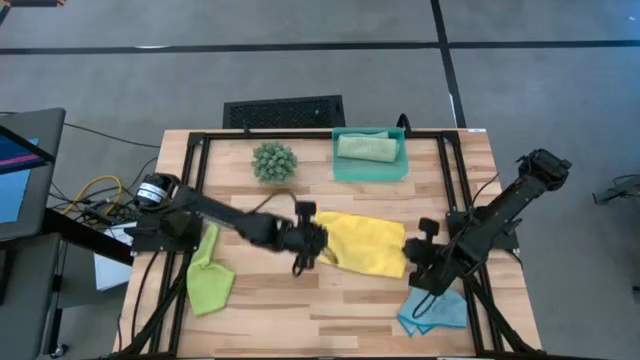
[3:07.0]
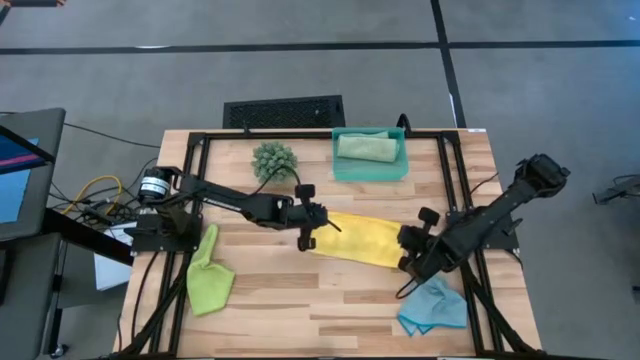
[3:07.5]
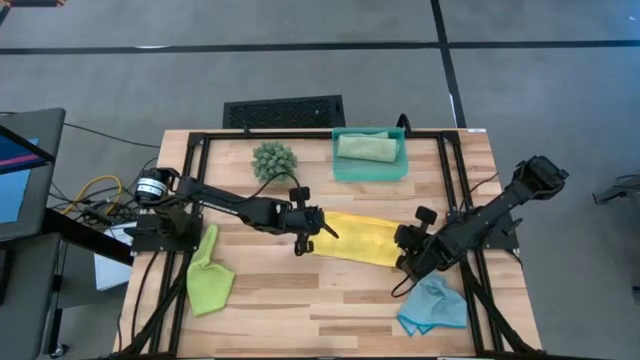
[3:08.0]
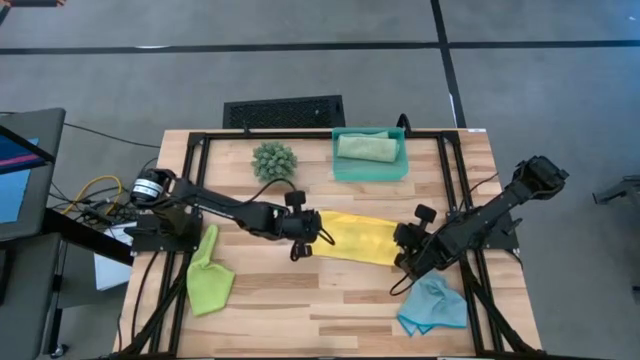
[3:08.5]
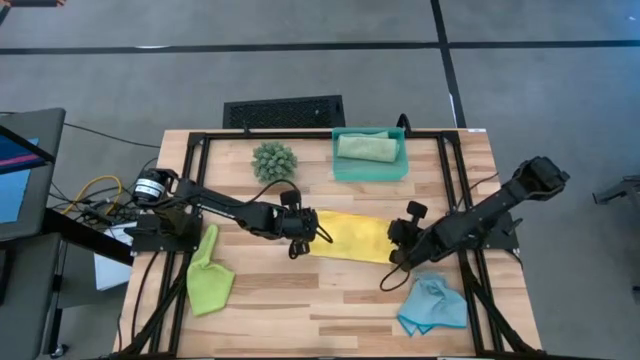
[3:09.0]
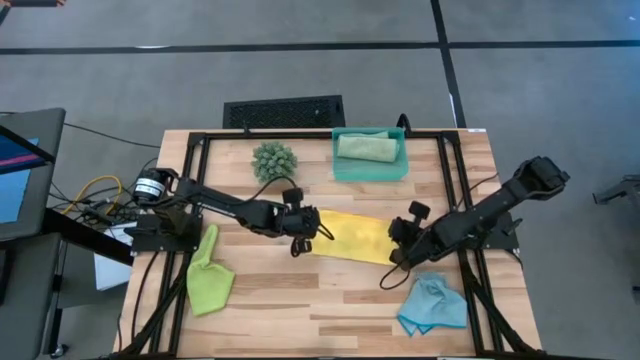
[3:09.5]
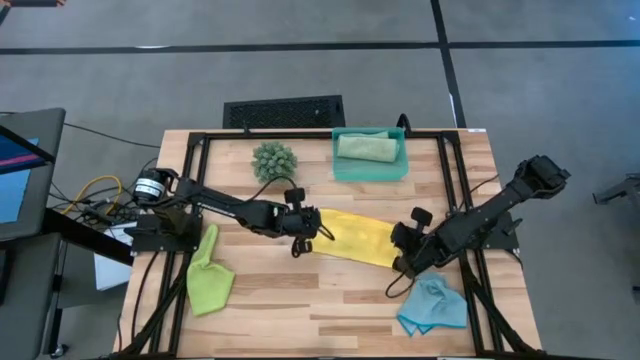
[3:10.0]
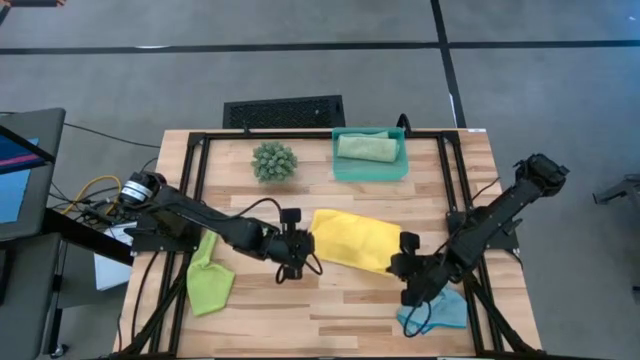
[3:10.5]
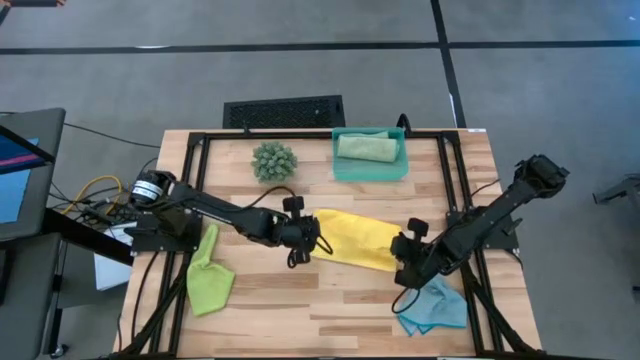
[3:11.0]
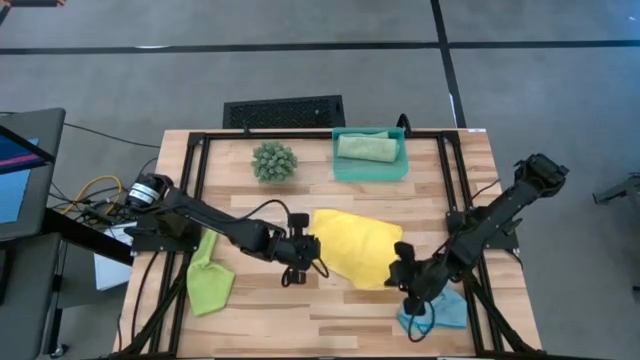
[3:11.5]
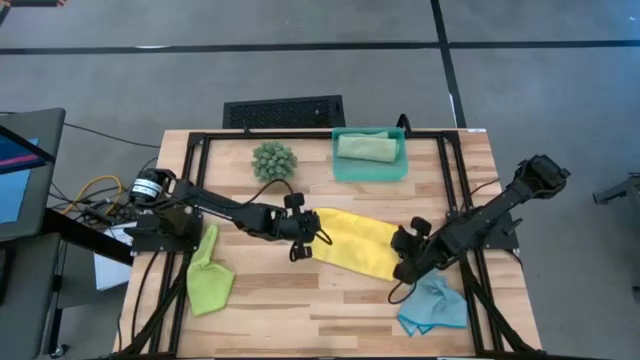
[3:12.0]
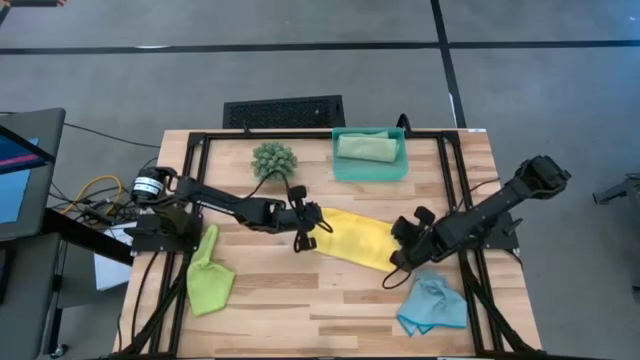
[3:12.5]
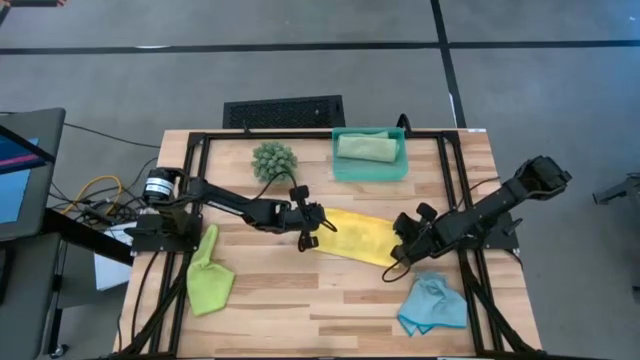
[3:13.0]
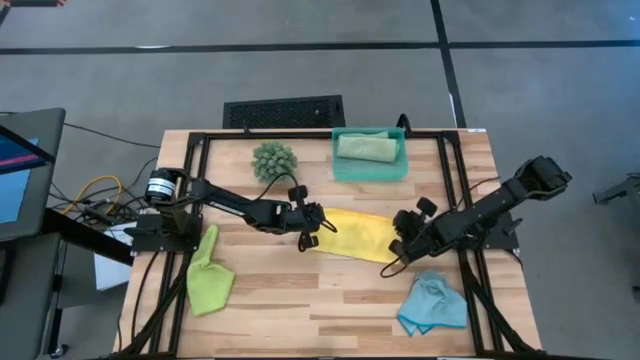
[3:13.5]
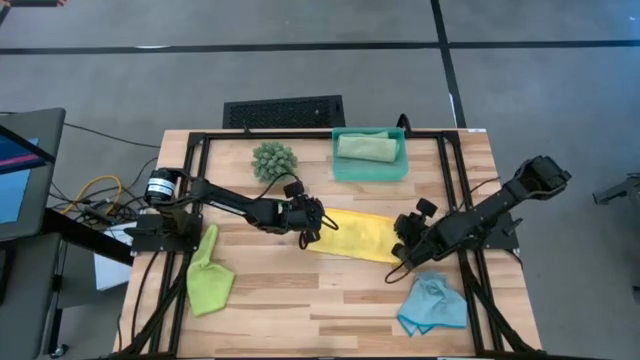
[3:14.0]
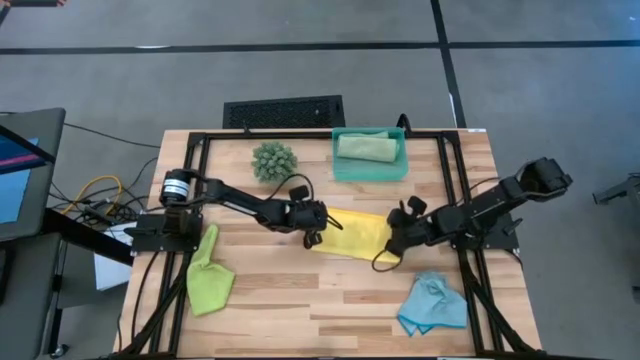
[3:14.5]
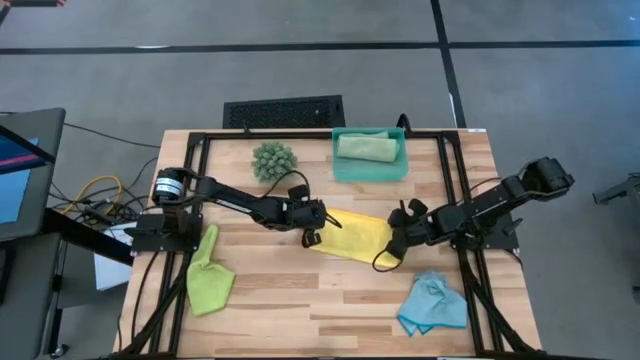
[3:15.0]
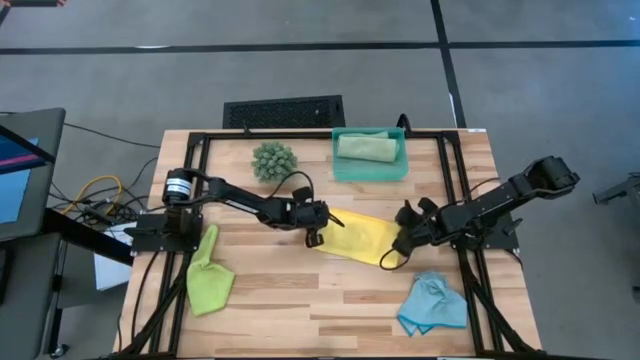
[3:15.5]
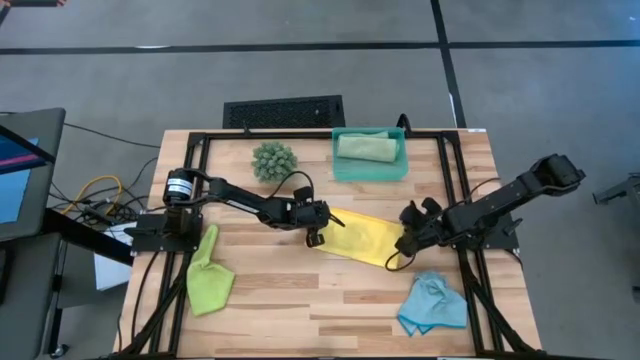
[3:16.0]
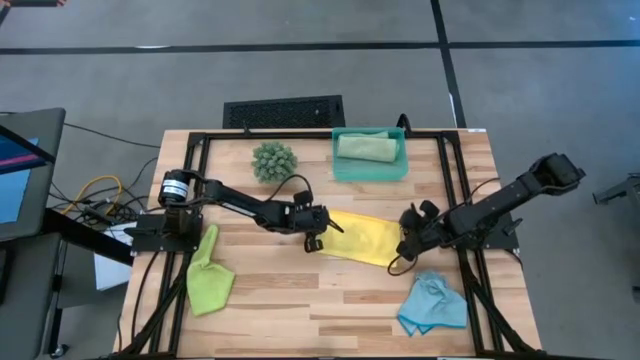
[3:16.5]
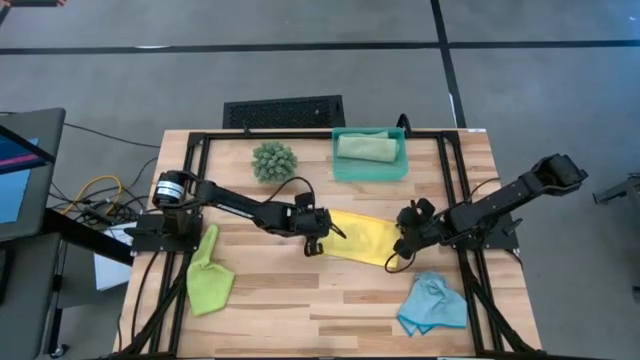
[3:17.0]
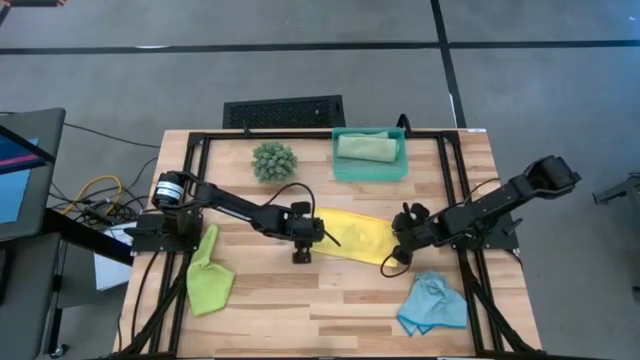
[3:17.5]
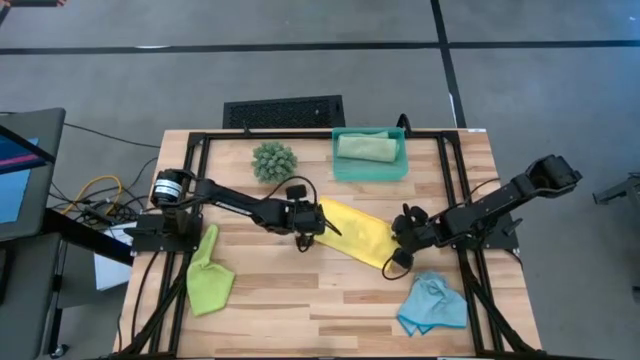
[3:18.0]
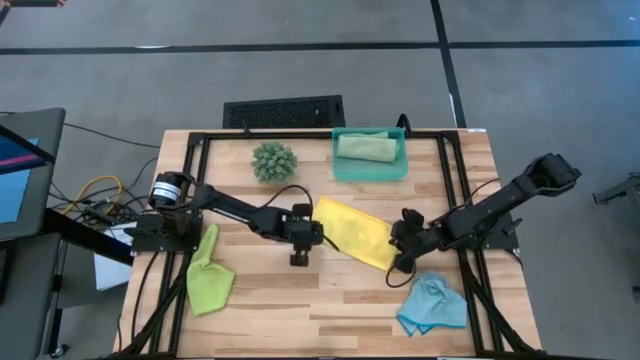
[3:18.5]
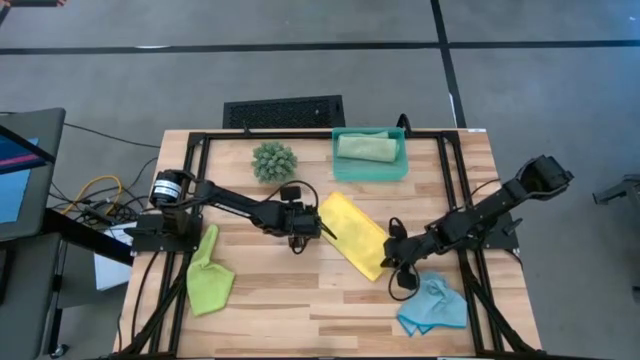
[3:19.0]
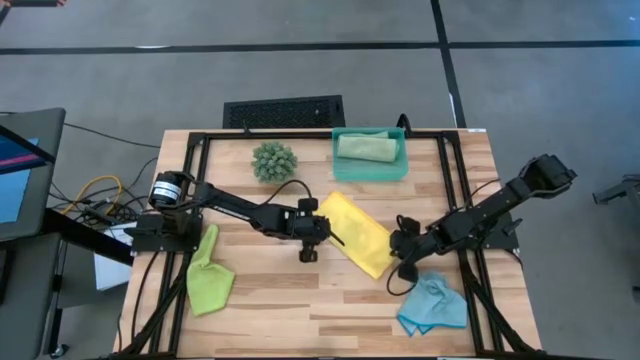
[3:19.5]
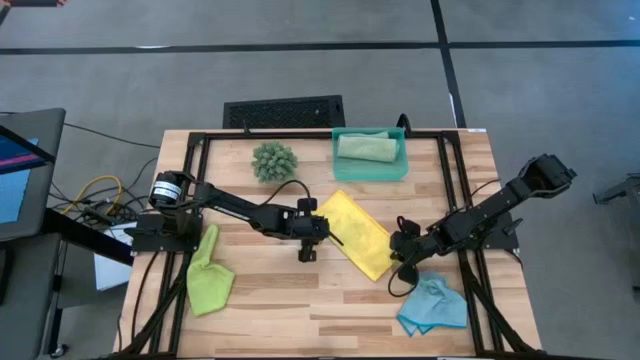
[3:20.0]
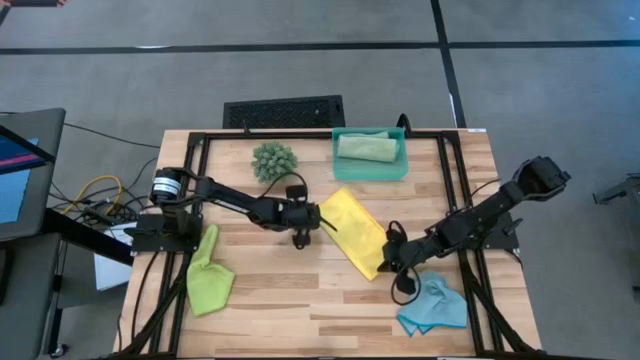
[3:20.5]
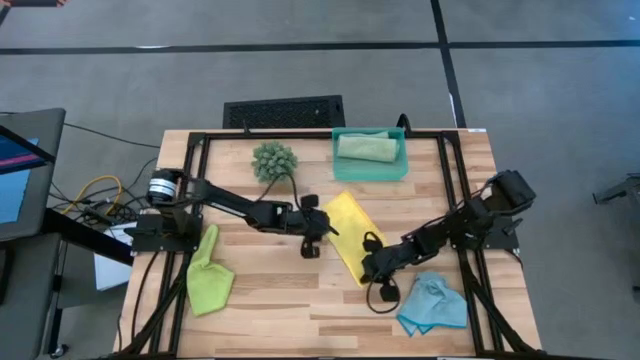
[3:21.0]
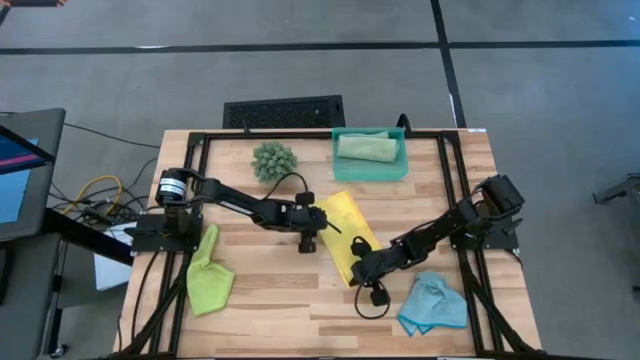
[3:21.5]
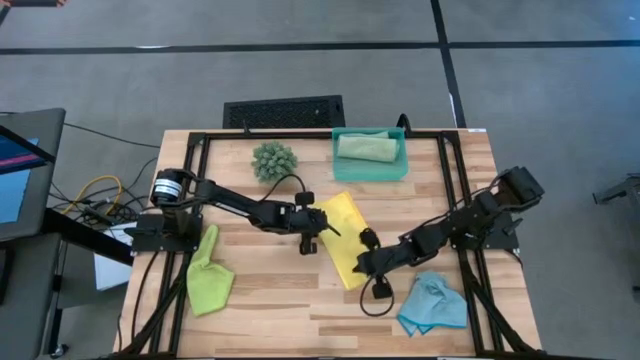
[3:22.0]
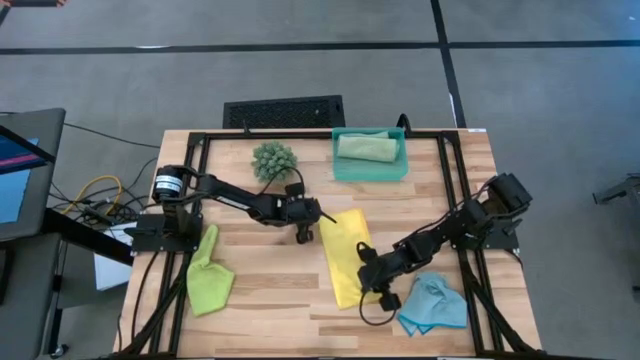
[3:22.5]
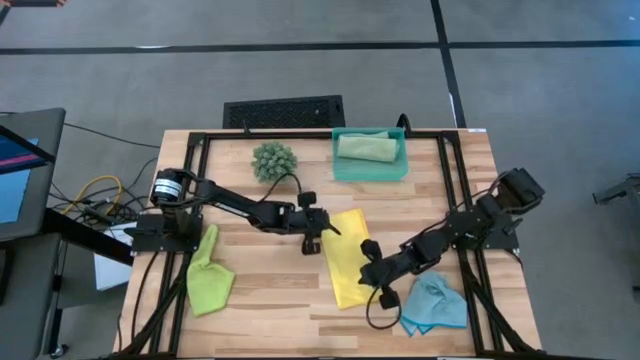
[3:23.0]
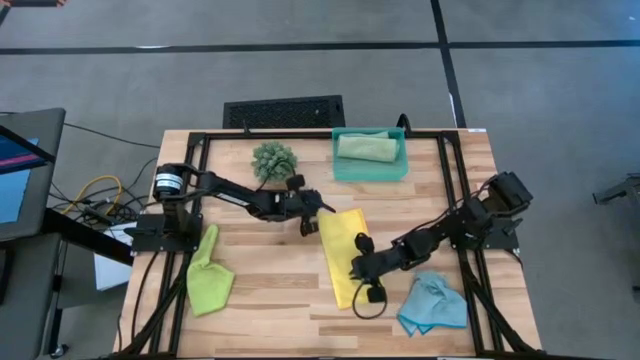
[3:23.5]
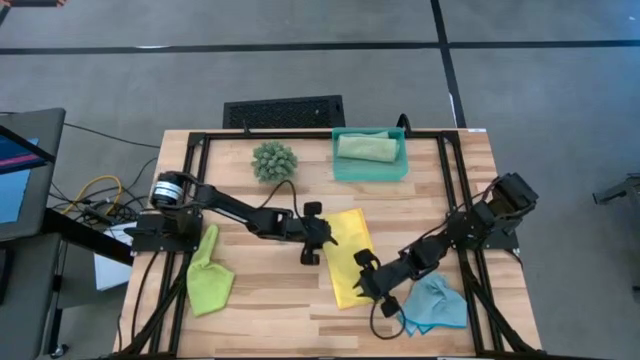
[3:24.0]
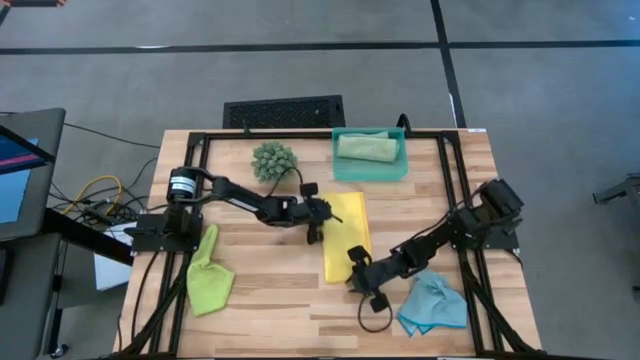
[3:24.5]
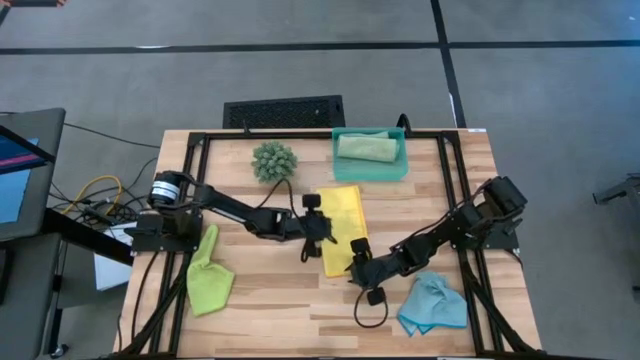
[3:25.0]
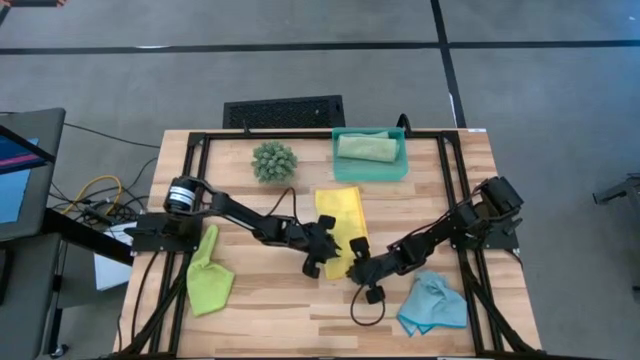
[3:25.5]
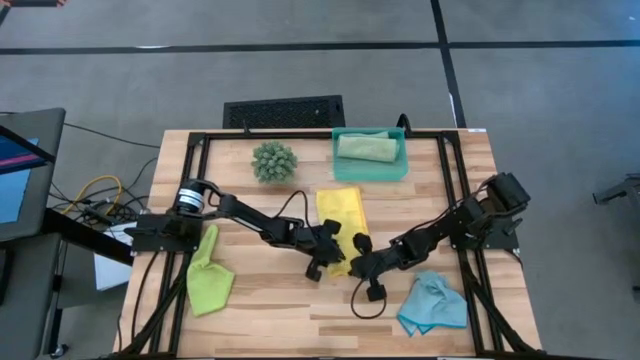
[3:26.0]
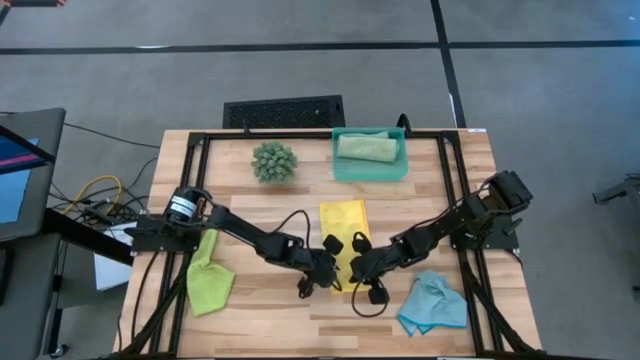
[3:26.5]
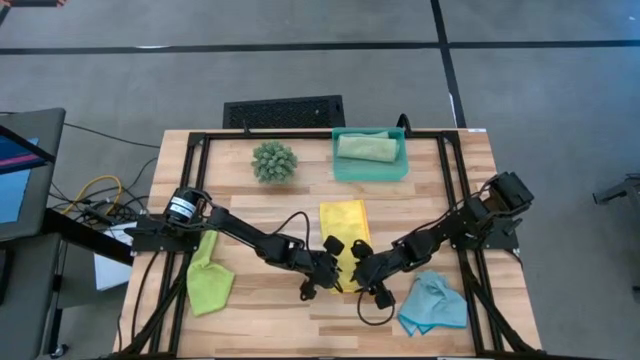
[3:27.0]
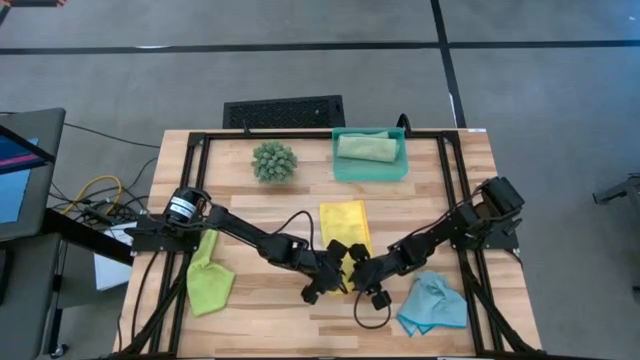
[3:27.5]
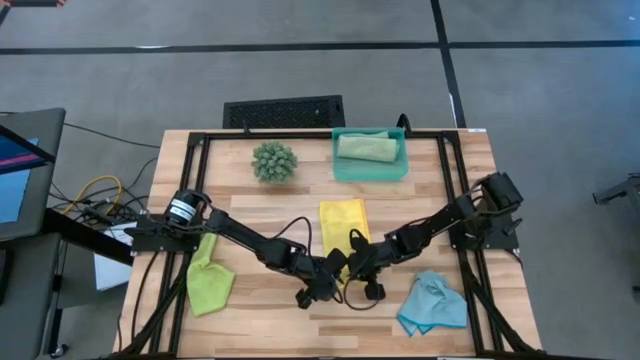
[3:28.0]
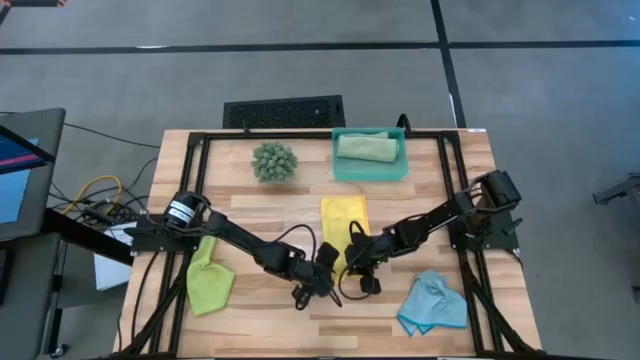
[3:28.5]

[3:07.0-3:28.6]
Task: Roll microfiber towels into tight, uniform cylinder then place into a basket
Roll the yellow microfiber cloth
